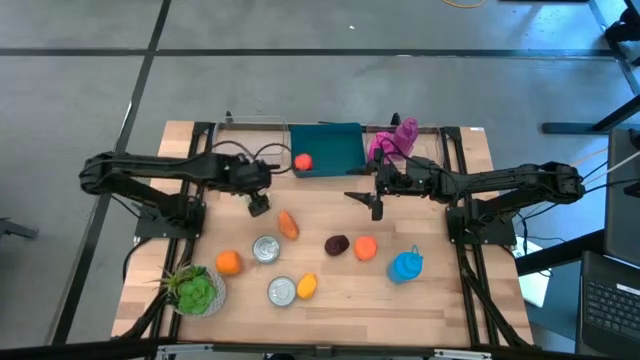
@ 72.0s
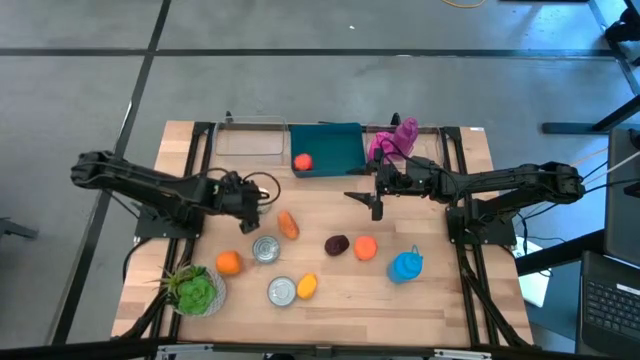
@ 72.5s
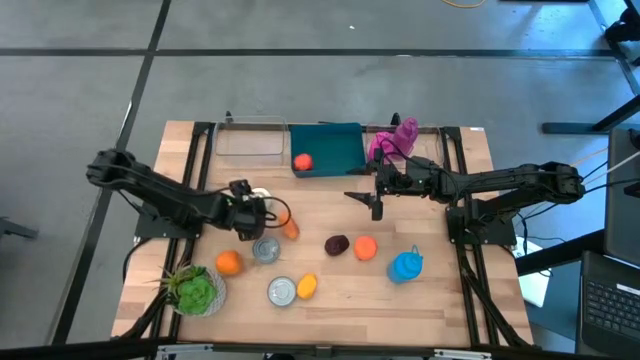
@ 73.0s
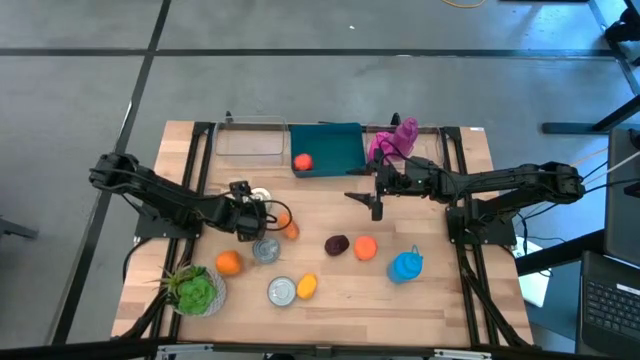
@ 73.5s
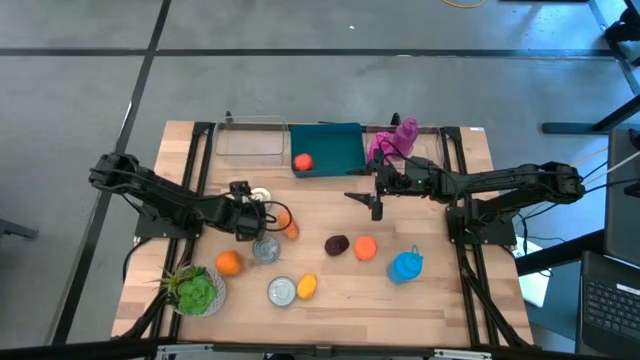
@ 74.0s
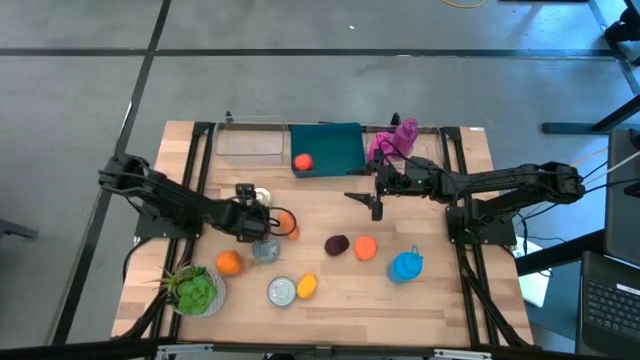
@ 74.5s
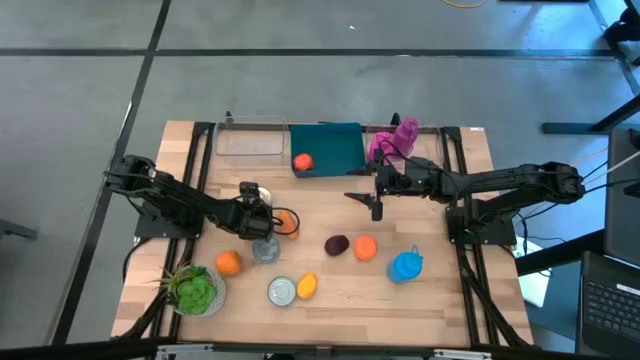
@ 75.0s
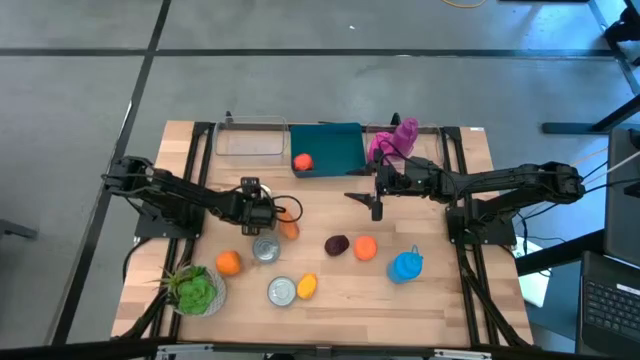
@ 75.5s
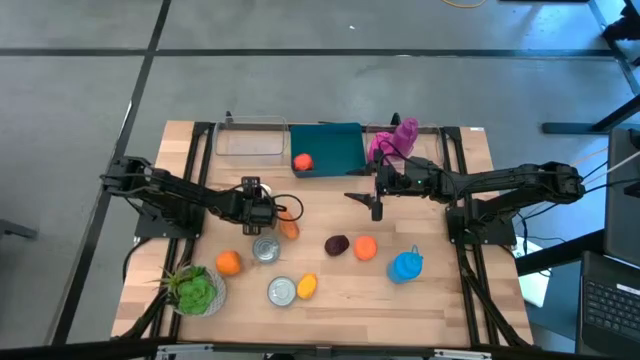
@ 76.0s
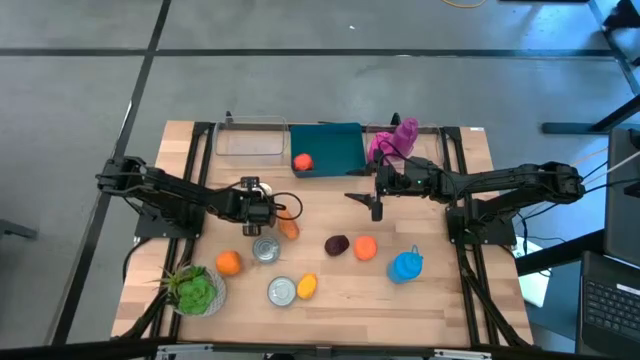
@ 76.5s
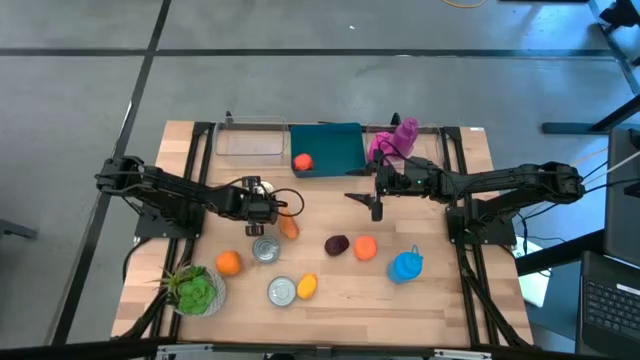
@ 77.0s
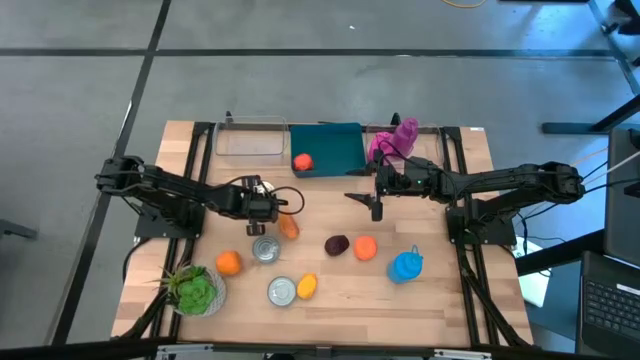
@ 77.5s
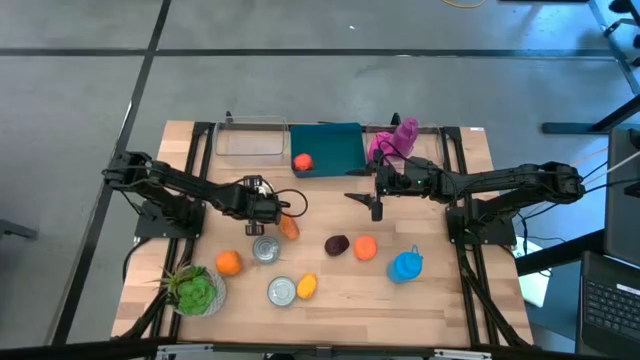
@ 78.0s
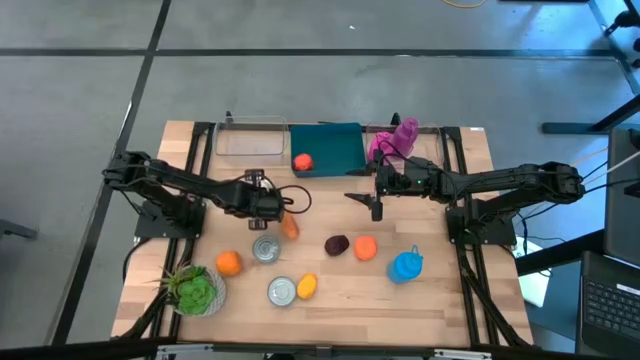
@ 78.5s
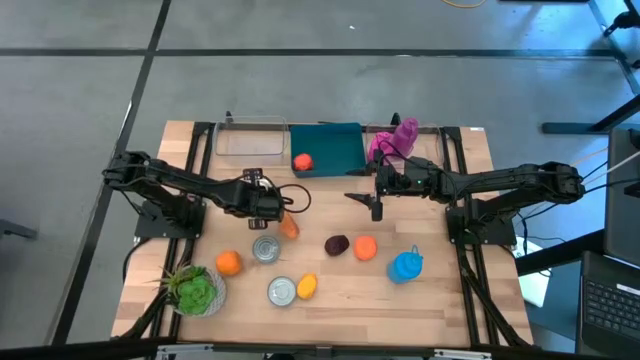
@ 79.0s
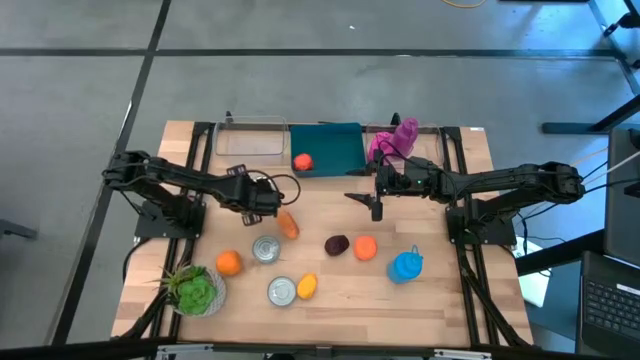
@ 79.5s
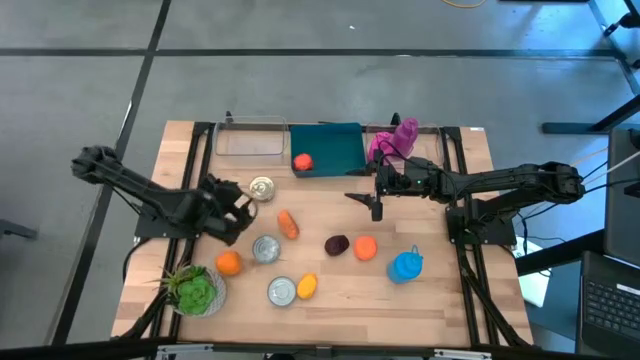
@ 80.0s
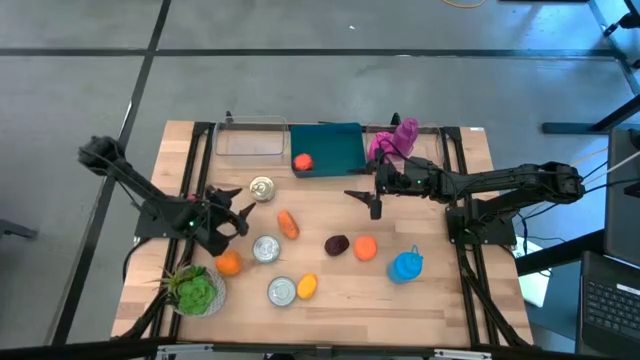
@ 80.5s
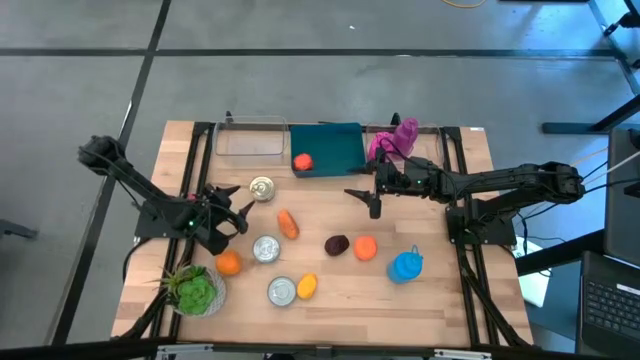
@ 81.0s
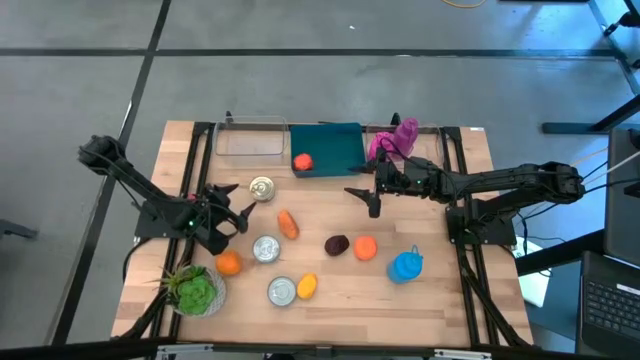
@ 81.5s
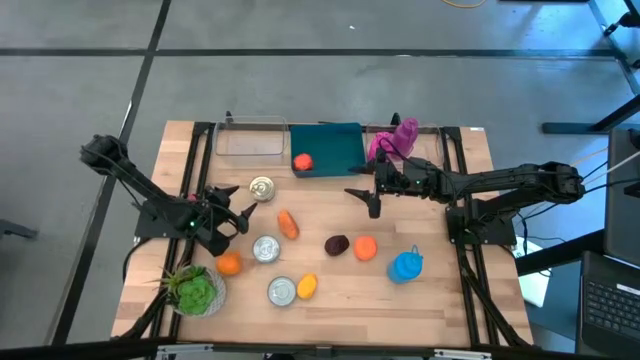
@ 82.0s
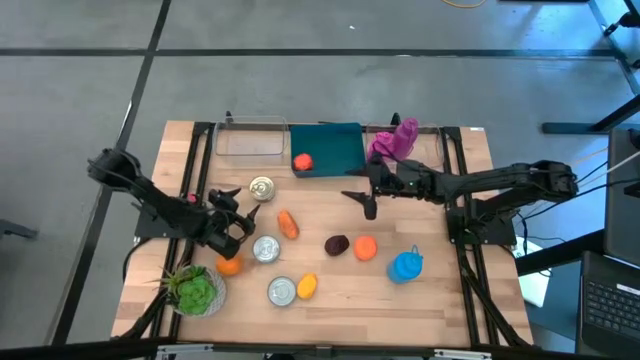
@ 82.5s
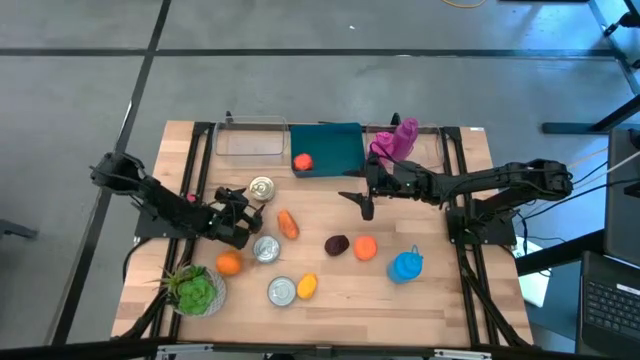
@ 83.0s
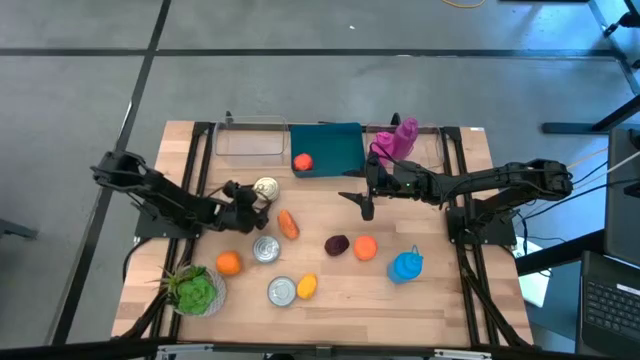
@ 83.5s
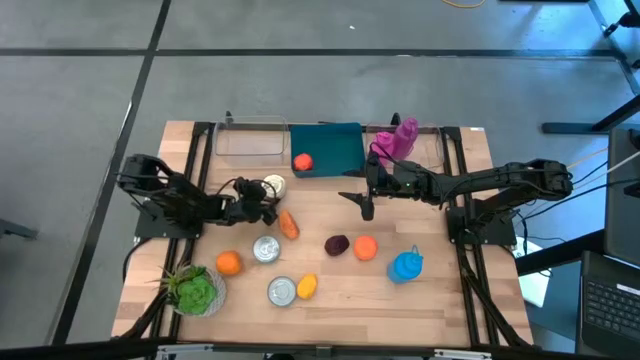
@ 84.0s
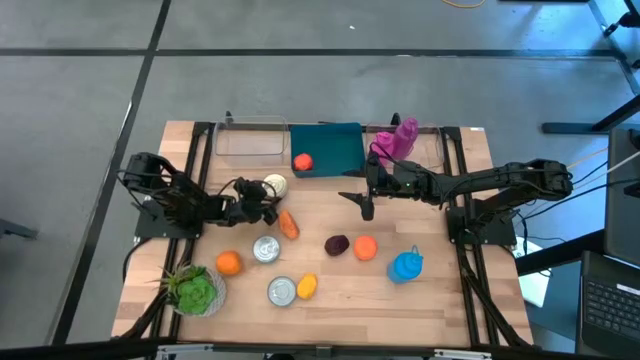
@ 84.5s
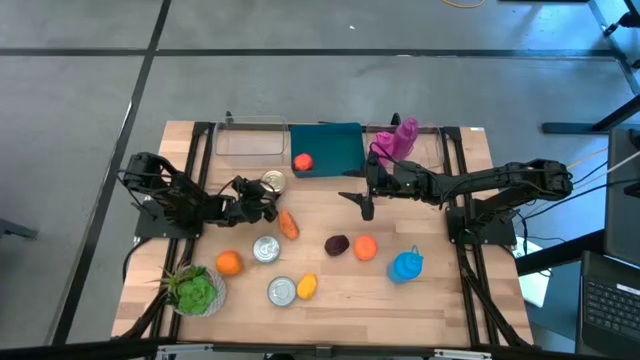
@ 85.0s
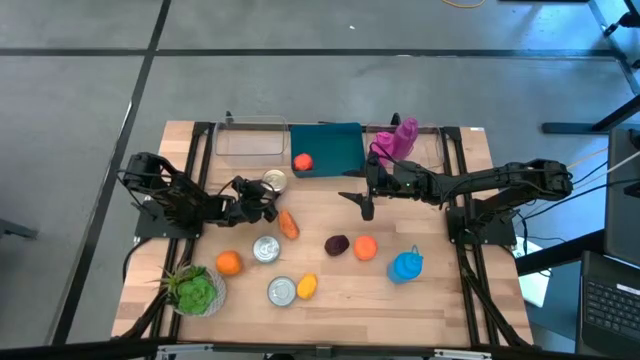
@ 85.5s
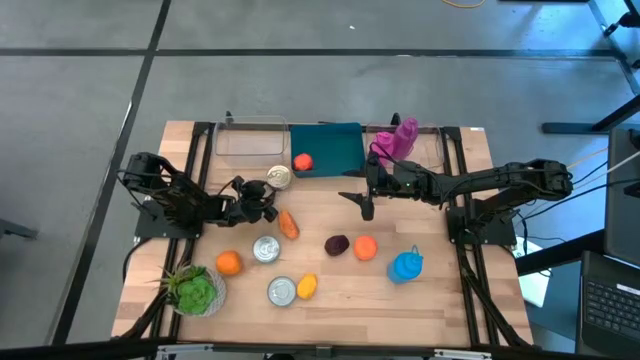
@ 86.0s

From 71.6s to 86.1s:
Task: Pick & Place Food Item
Put the top blue pink tuna can into the left transparent bin

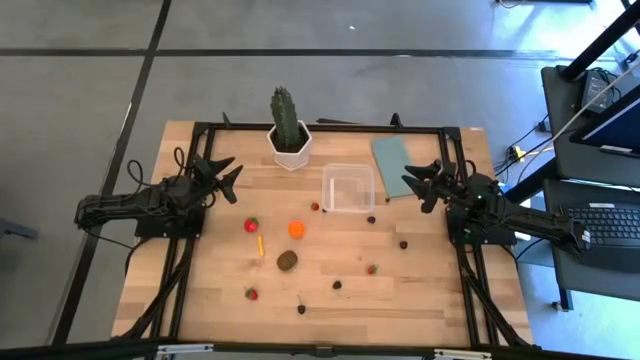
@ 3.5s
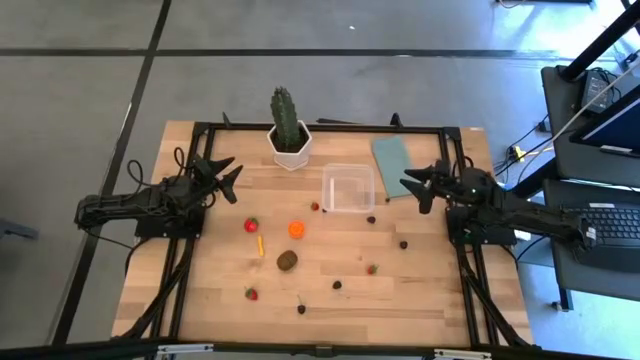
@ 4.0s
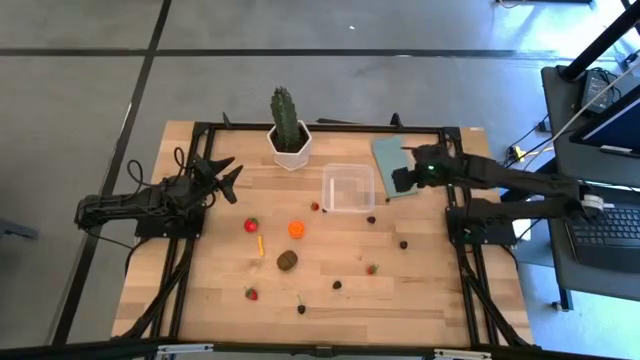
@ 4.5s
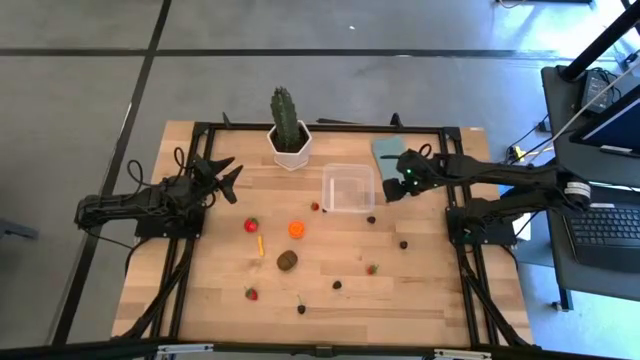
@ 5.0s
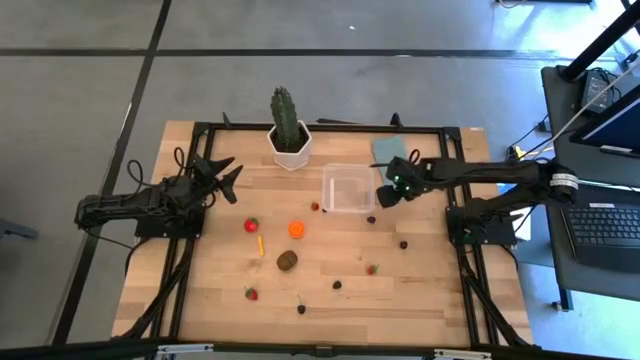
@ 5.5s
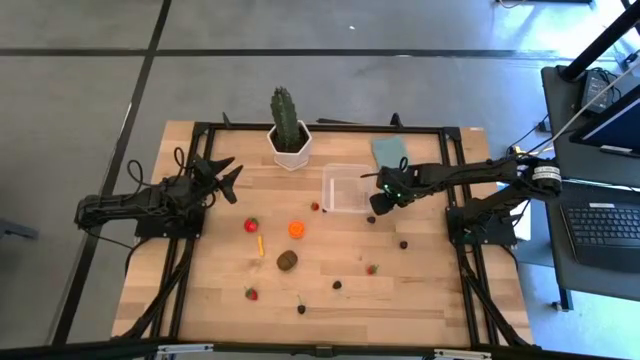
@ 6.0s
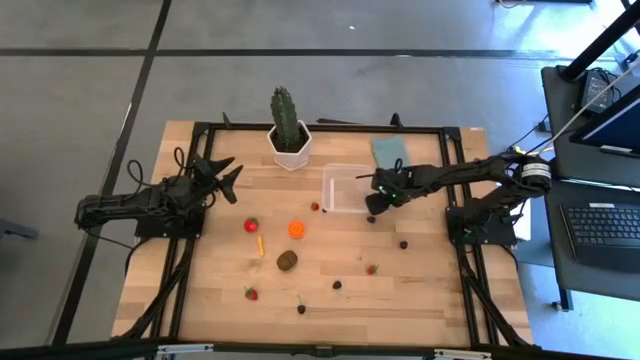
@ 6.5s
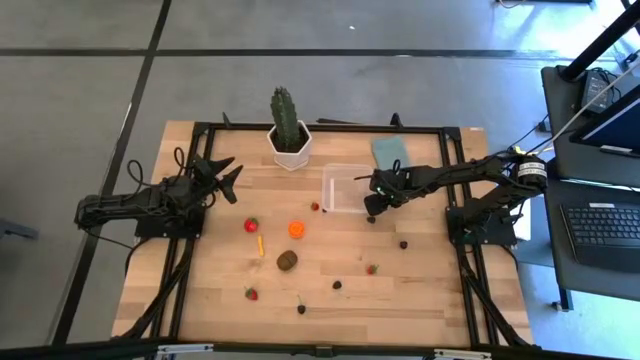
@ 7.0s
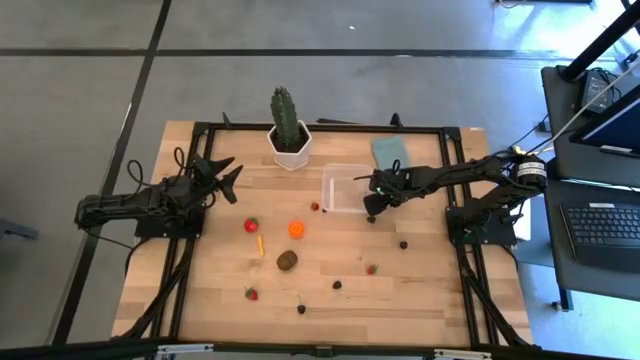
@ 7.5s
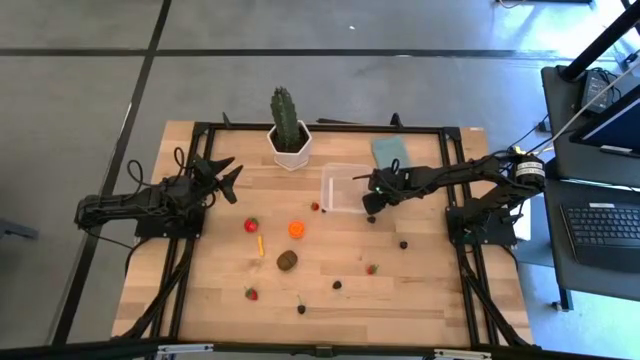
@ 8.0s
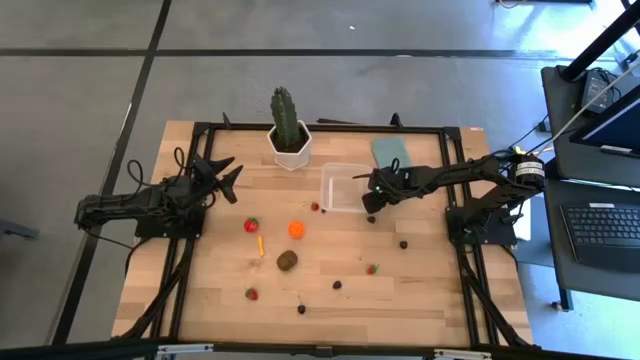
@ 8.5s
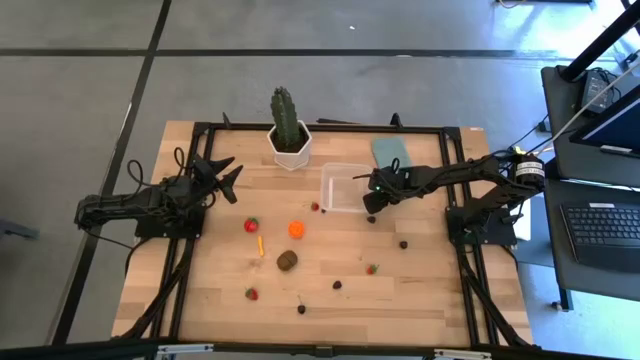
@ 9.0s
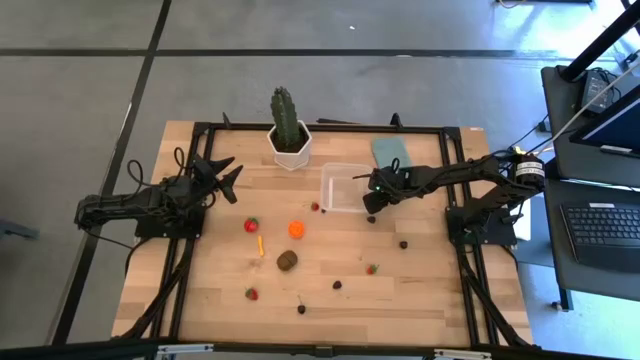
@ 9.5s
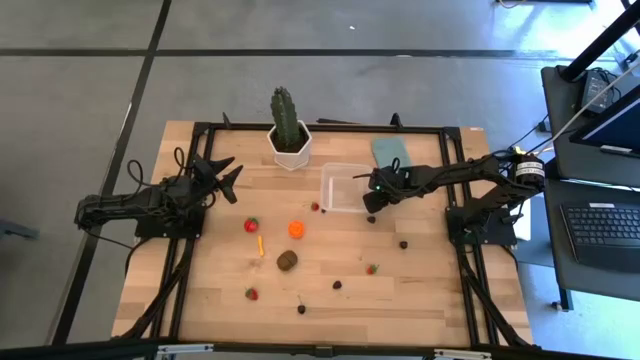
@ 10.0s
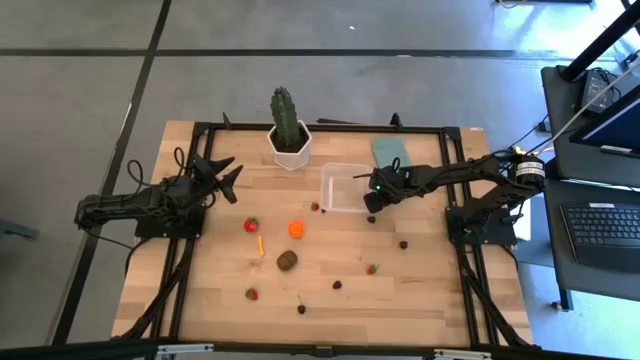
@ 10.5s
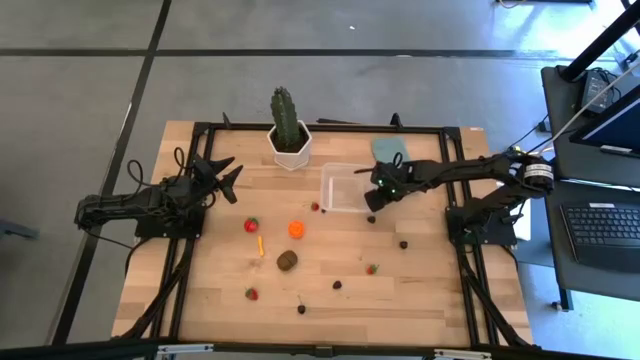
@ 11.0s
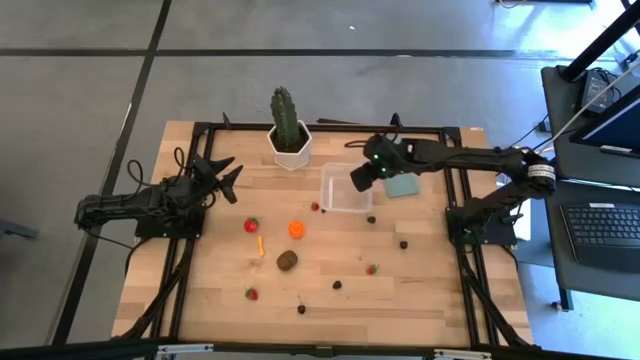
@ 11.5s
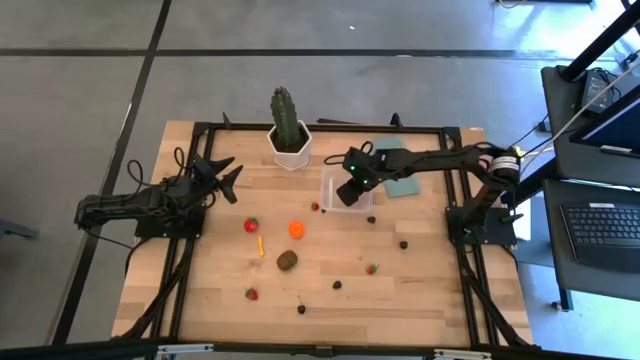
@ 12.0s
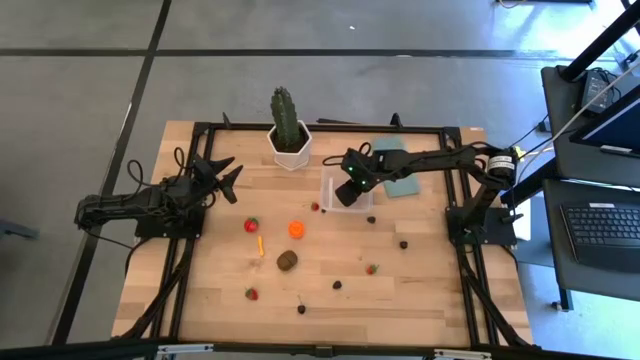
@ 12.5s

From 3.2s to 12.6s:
Task: Pick and placing Produce into tupperware
Put the right blueberry into the transparent bin
